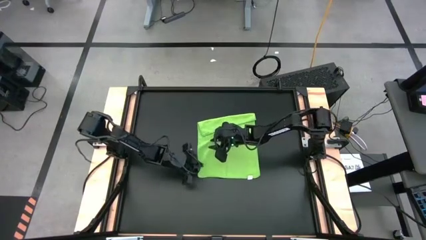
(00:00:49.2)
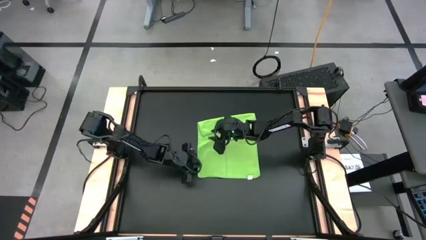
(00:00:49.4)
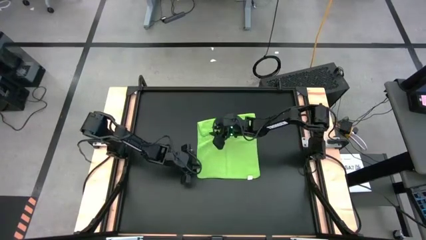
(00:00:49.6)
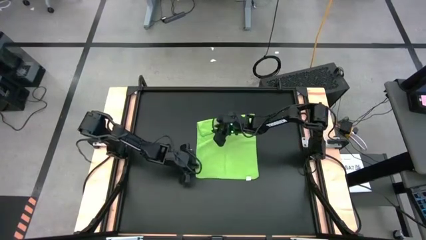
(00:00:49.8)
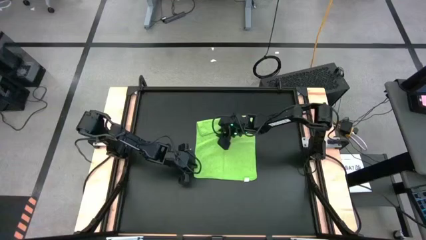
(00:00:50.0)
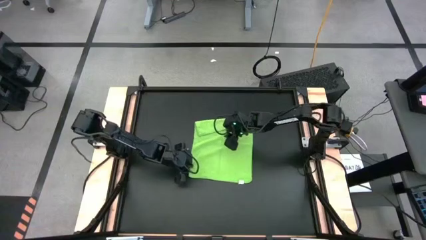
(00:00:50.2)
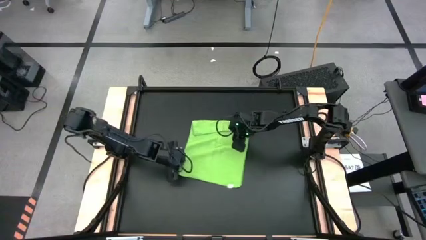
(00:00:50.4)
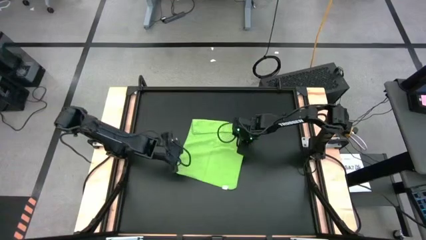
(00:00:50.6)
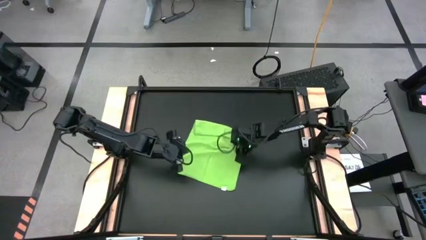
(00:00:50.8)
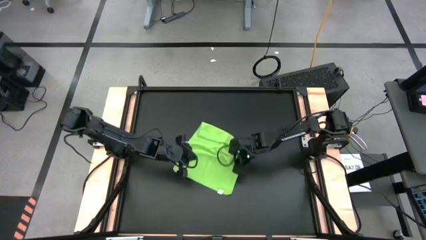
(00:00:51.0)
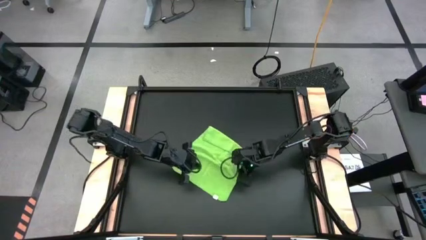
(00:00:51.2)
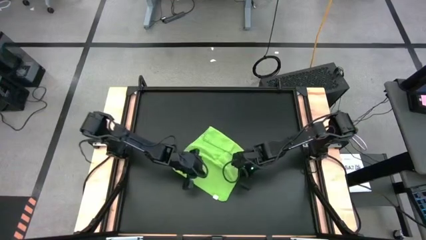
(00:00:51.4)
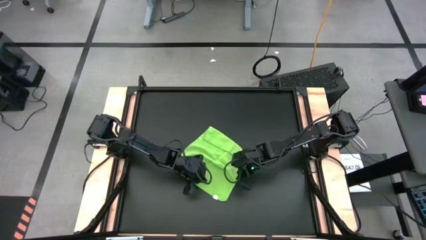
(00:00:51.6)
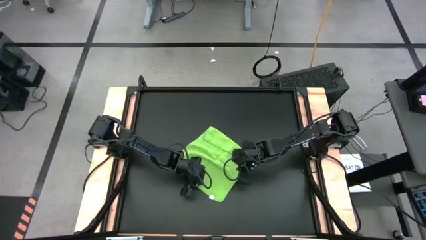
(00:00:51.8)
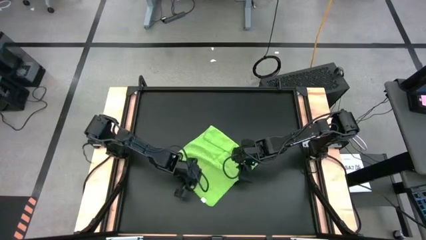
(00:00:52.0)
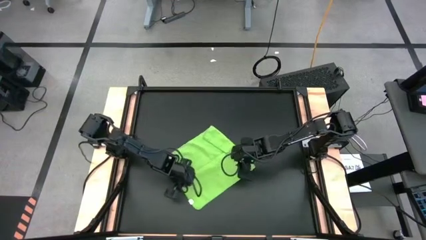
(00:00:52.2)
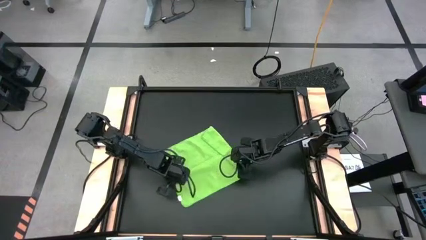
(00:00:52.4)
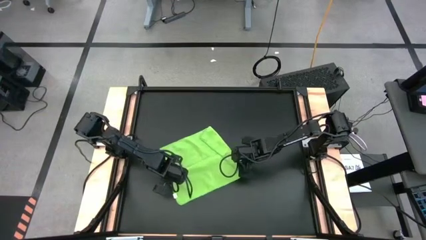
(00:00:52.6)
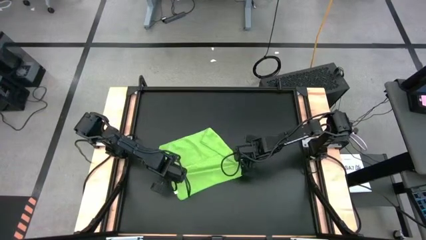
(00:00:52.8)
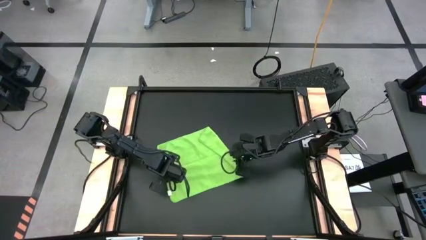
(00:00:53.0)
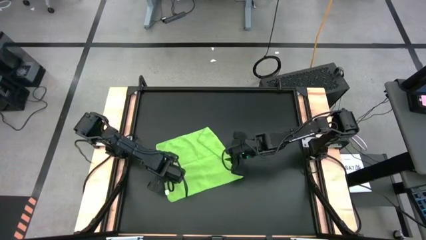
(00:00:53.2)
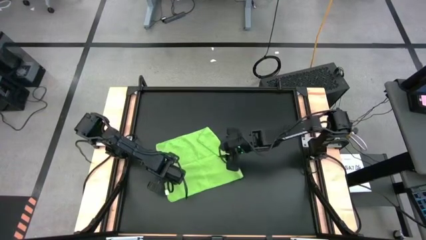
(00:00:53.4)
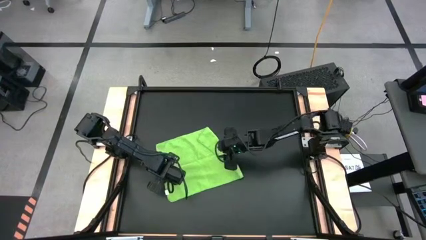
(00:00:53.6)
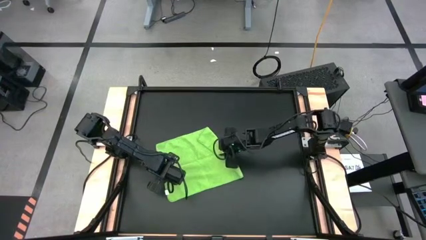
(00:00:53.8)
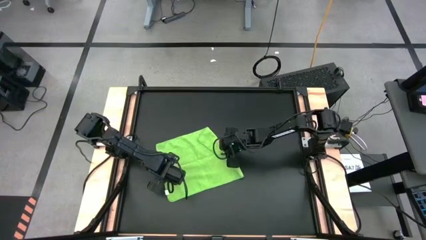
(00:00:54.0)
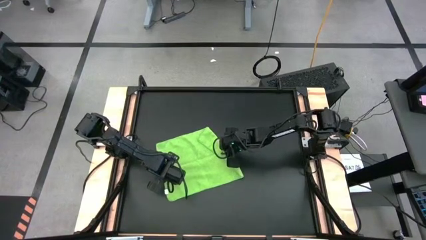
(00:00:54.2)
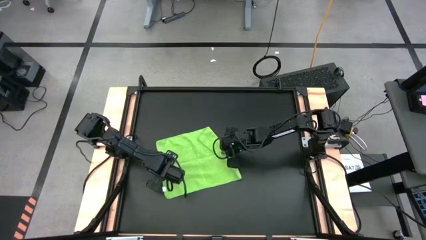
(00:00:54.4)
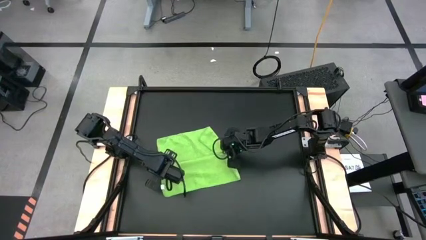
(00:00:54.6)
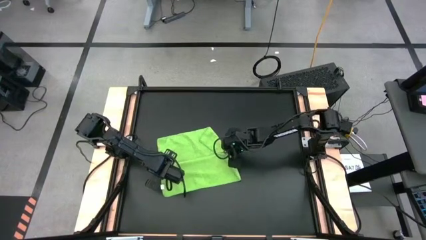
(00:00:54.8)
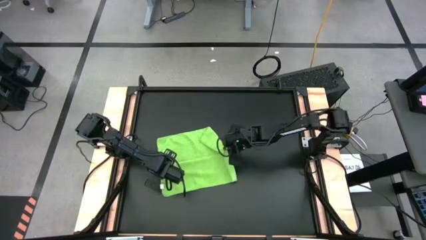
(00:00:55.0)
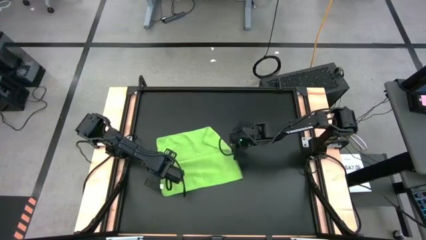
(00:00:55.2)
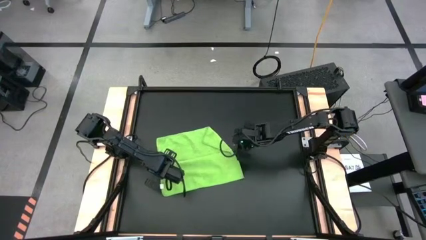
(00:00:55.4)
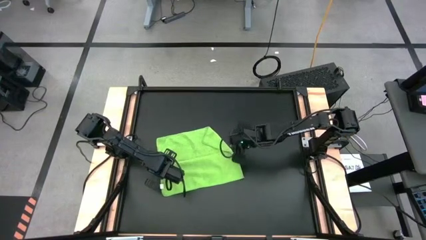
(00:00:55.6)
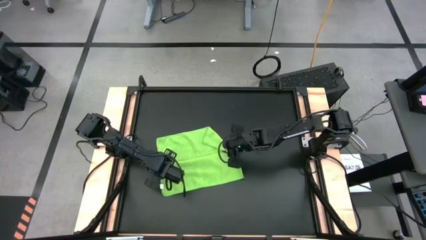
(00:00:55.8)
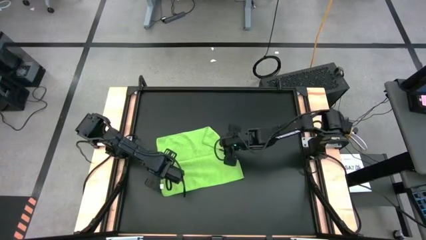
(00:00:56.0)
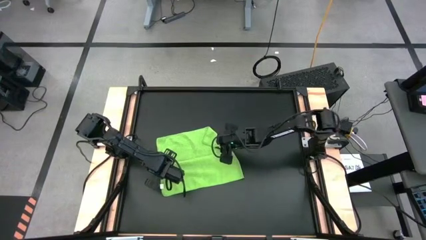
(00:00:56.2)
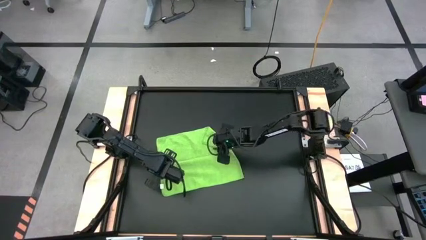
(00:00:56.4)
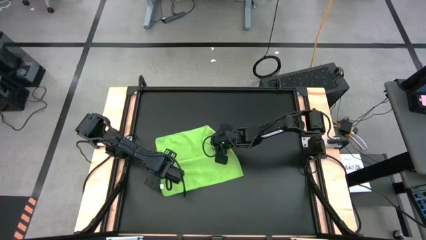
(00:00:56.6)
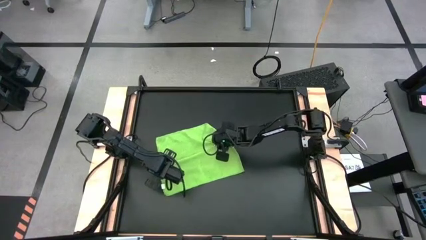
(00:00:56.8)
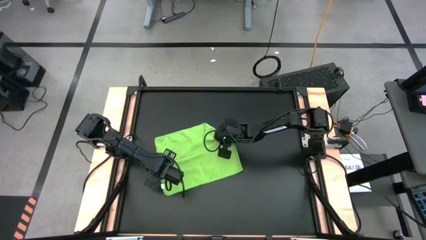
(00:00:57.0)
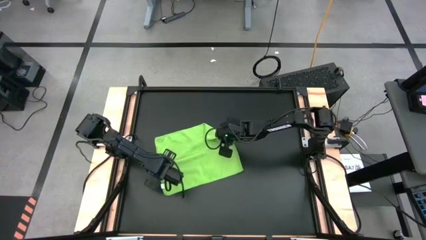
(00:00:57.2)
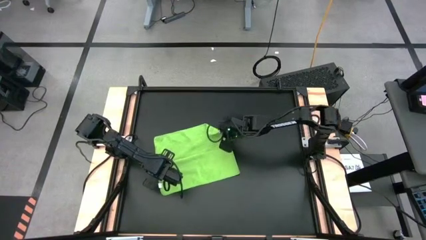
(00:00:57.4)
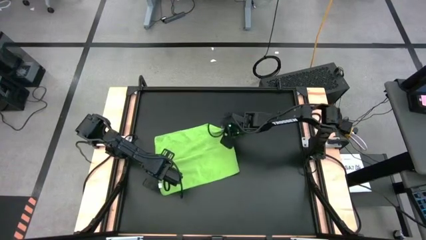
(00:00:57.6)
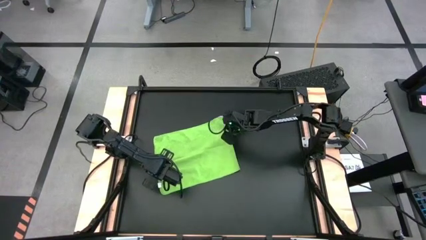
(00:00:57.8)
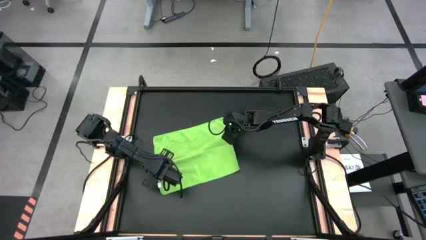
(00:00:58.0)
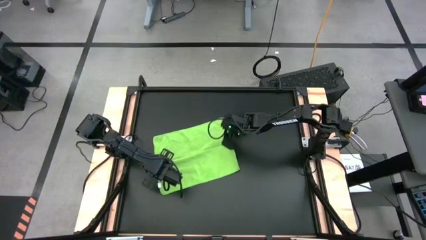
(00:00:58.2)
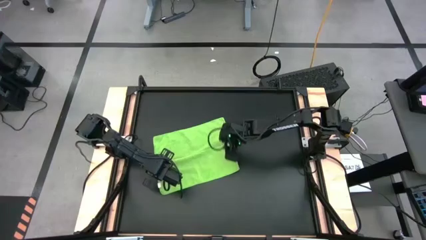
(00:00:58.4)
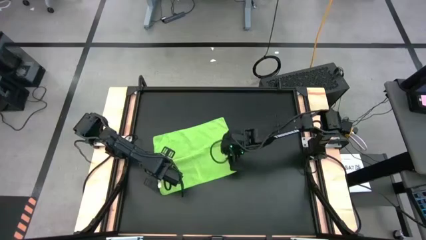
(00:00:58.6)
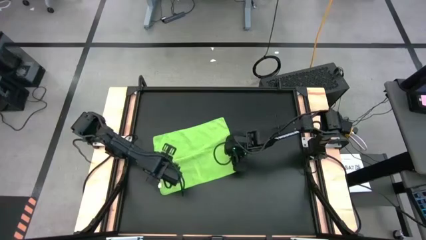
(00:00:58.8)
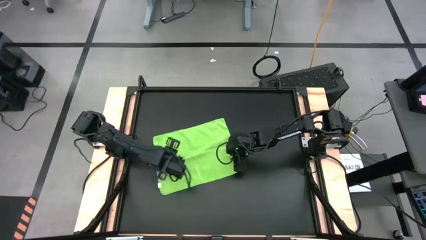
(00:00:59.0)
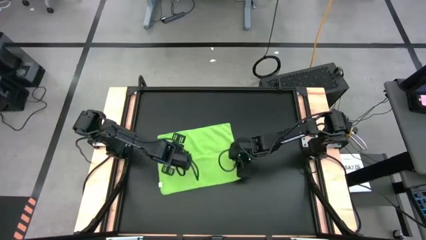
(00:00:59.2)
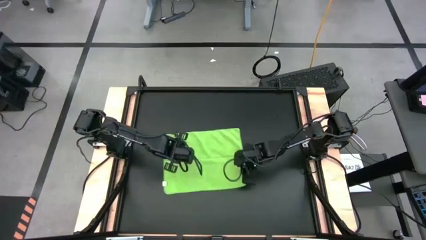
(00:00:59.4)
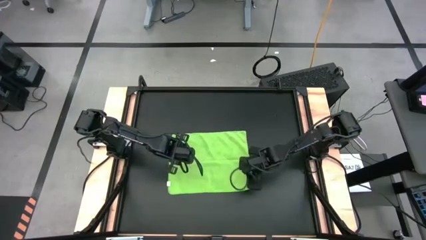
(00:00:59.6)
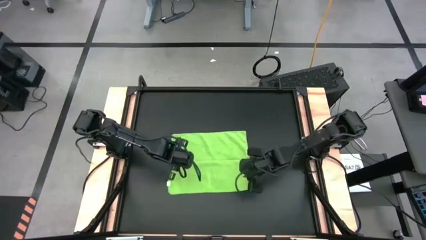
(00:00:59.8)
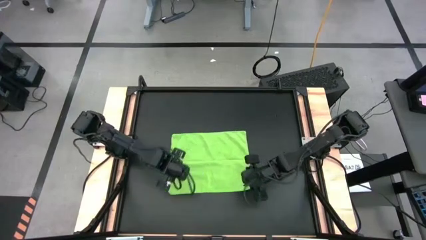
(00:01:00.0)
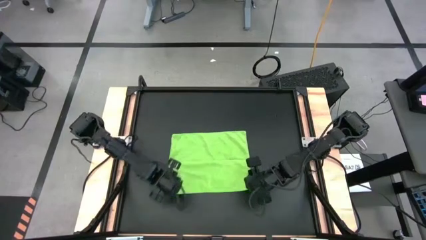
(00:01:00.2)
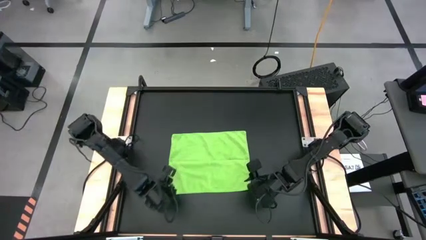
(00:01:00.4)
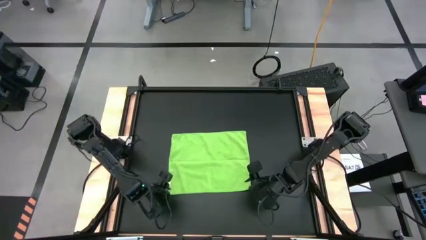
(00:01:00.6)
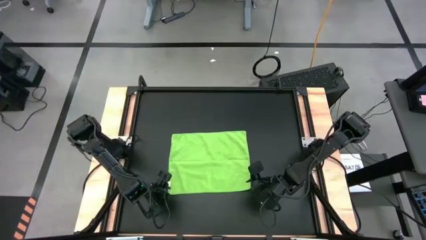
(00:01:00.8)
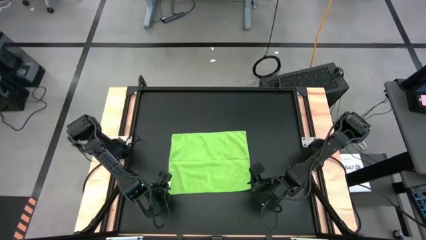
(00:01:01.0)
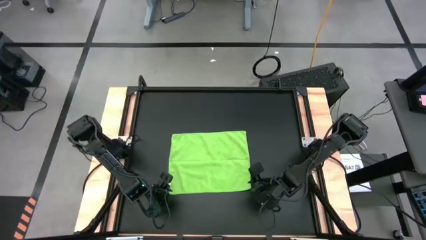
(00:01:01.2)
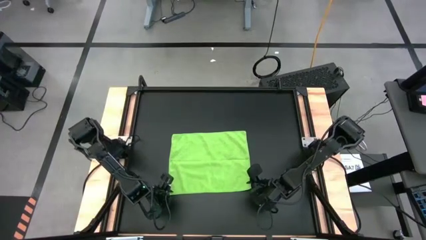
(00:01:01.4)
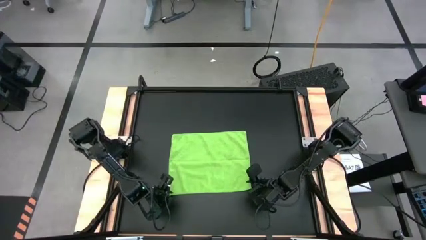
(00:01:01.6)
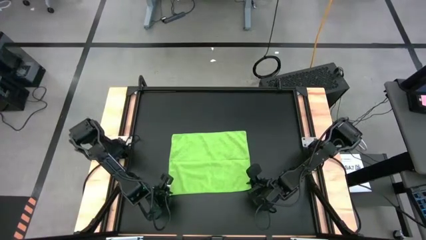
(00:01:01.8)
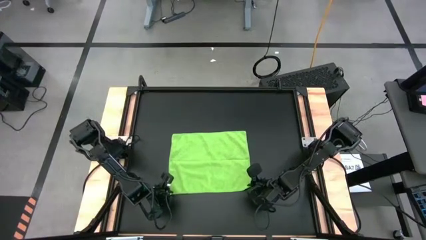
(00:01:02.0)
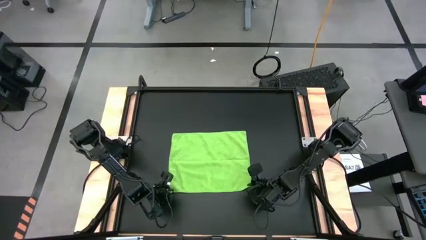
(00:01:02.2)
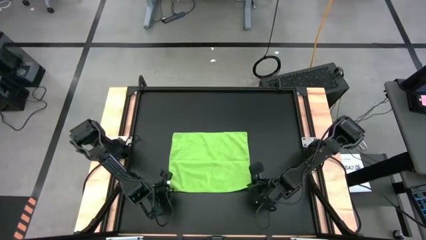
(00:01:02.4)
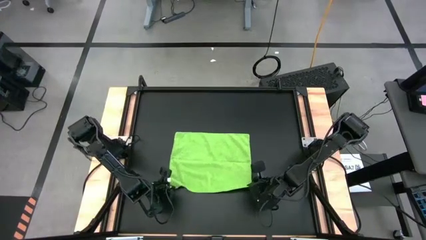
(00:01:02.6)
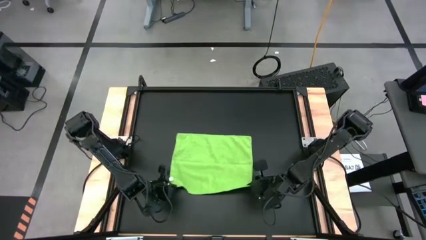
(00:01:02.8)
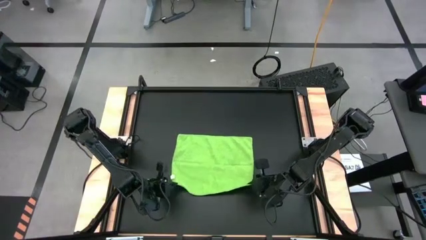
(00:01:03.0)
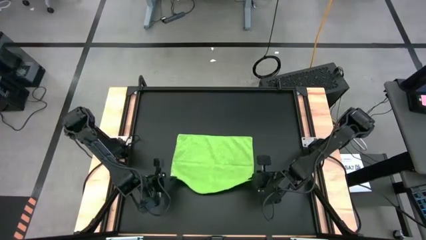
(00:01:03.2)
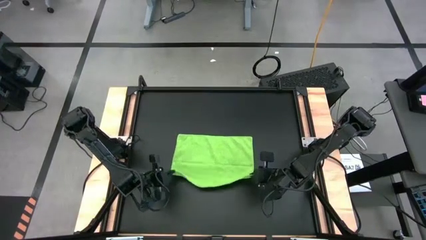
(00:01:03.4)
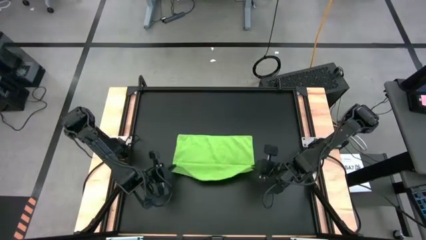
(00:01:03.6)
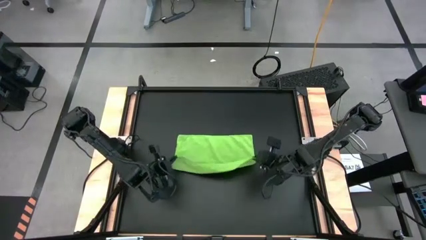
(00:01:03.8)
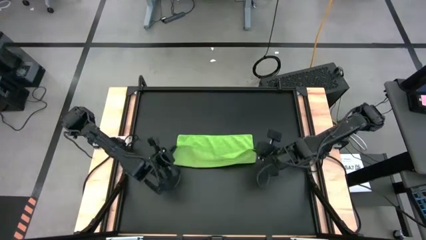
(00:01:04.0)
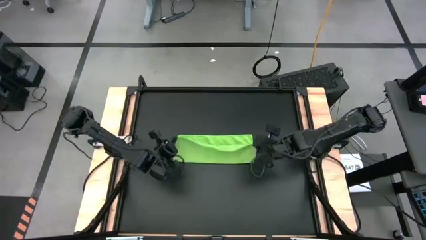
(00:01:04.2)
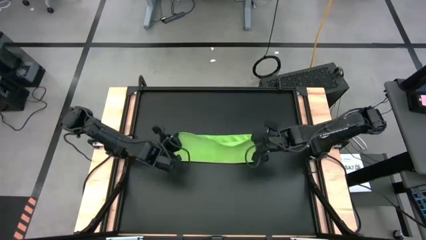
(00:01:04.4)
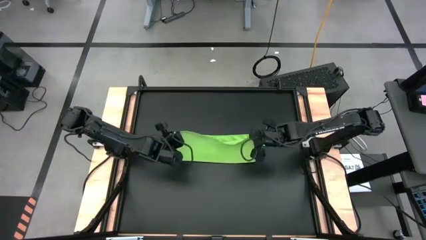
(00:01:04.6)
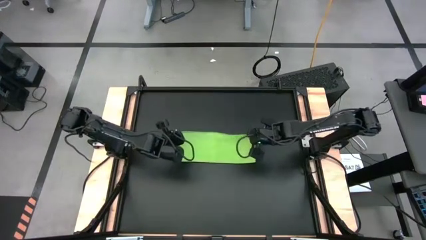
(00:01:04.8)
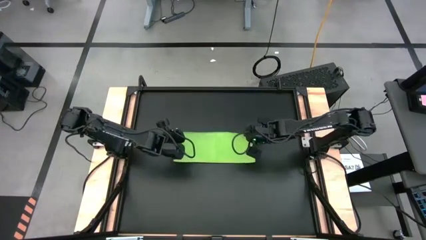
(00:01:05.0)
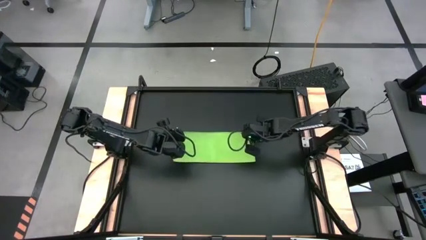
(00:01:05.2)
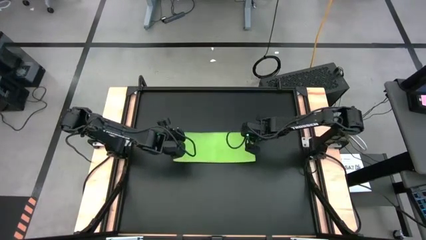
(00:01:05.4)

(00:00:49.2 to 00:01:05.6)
Task: Roll towel into tight, uniform cylinder
Fold the green towel
